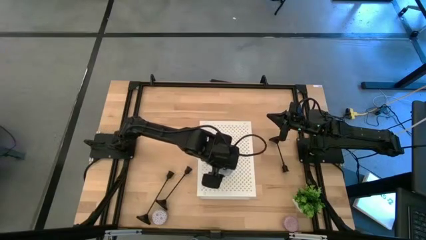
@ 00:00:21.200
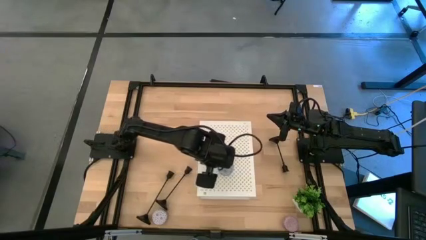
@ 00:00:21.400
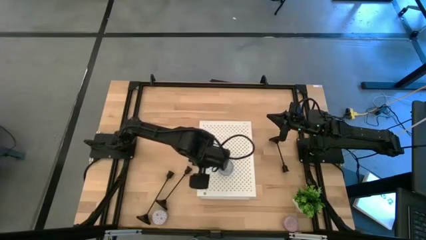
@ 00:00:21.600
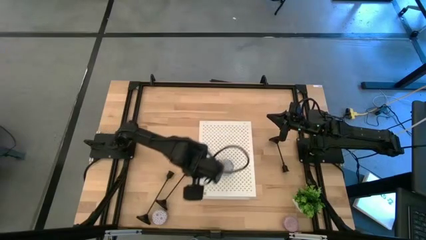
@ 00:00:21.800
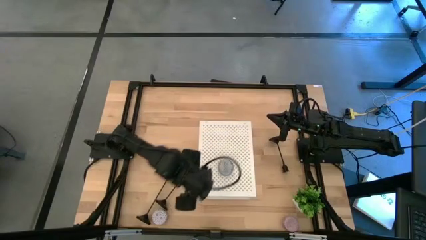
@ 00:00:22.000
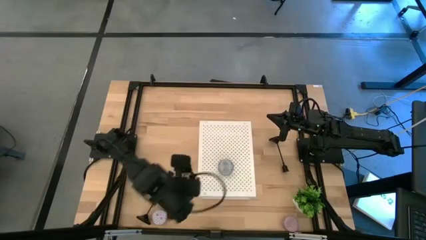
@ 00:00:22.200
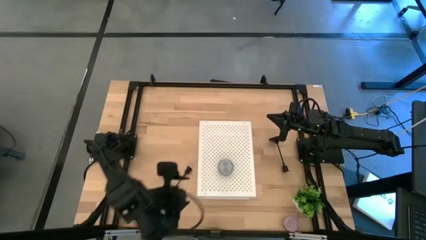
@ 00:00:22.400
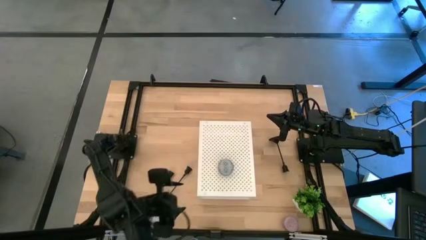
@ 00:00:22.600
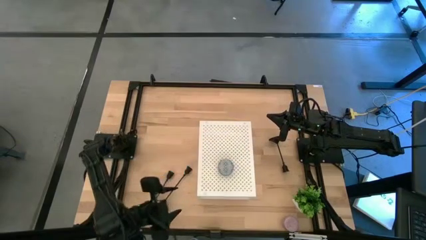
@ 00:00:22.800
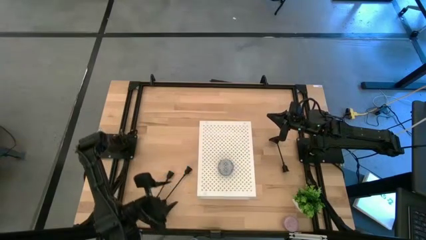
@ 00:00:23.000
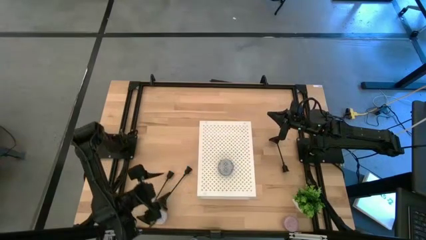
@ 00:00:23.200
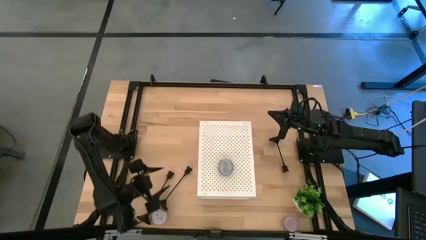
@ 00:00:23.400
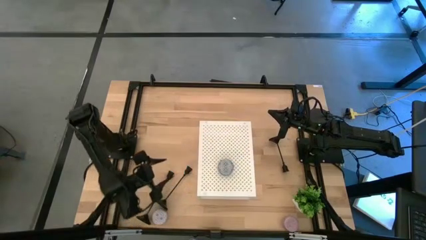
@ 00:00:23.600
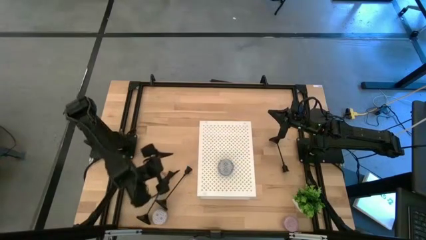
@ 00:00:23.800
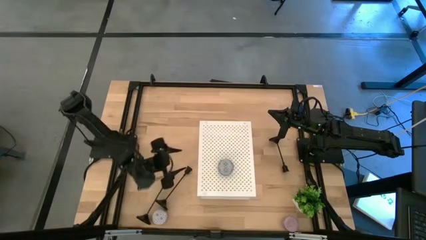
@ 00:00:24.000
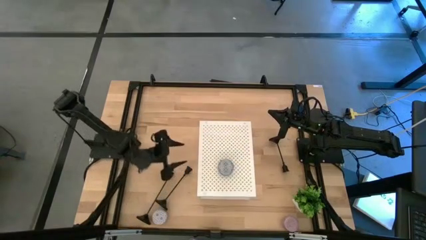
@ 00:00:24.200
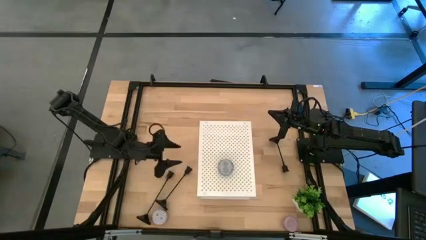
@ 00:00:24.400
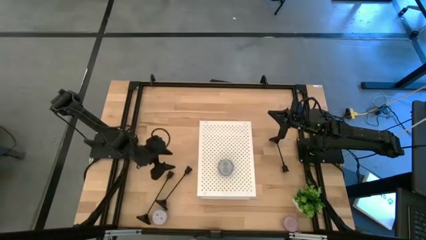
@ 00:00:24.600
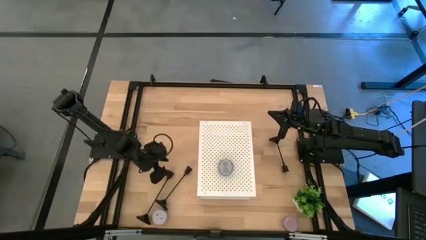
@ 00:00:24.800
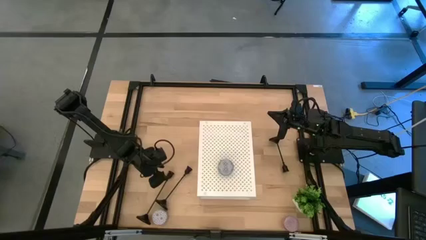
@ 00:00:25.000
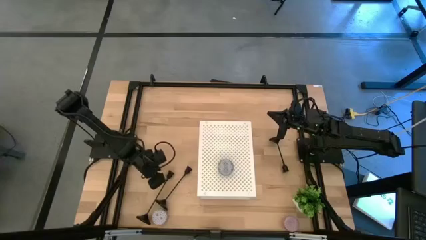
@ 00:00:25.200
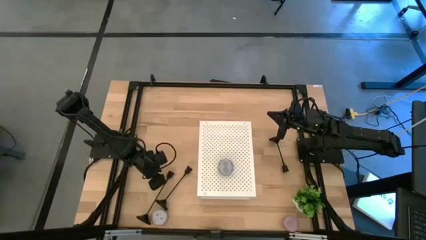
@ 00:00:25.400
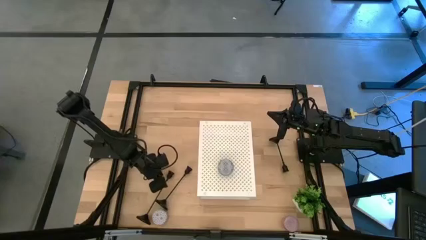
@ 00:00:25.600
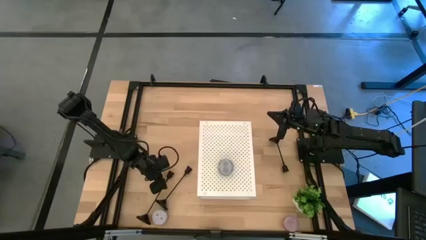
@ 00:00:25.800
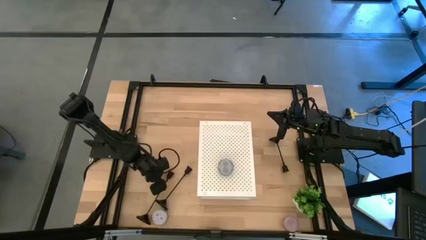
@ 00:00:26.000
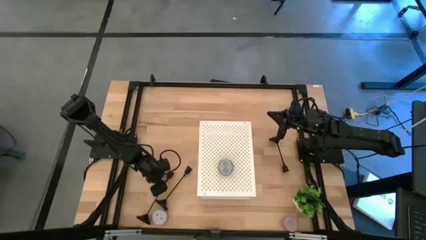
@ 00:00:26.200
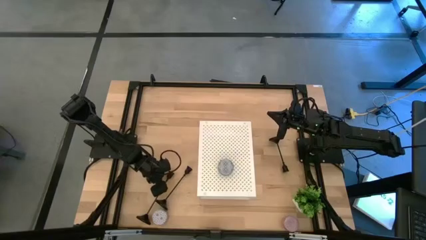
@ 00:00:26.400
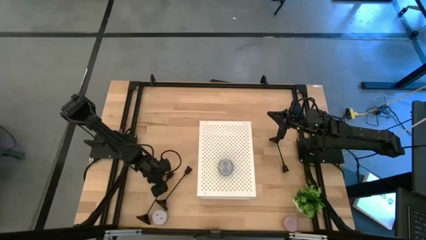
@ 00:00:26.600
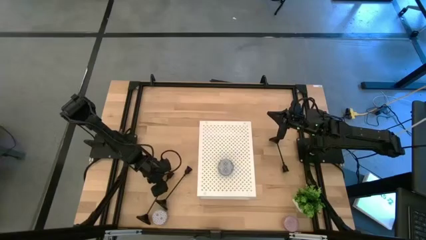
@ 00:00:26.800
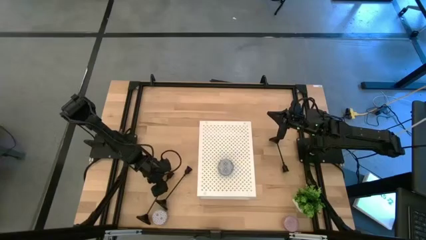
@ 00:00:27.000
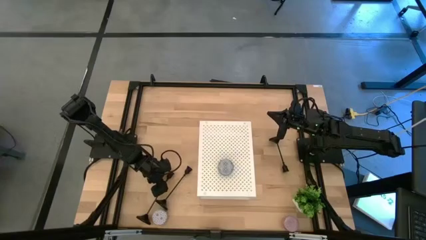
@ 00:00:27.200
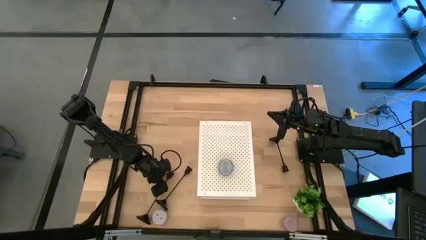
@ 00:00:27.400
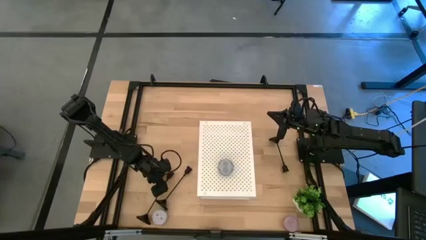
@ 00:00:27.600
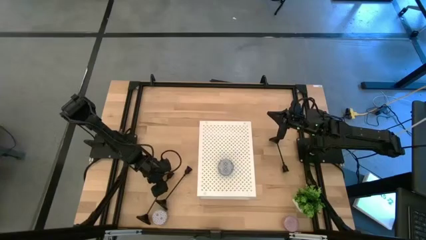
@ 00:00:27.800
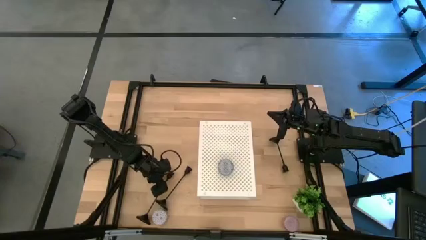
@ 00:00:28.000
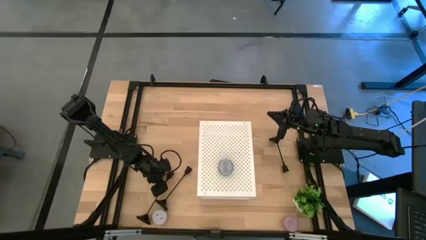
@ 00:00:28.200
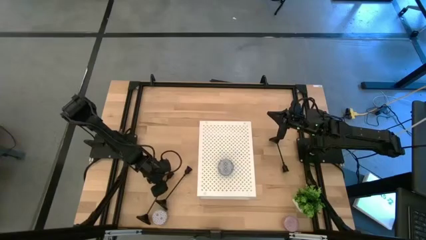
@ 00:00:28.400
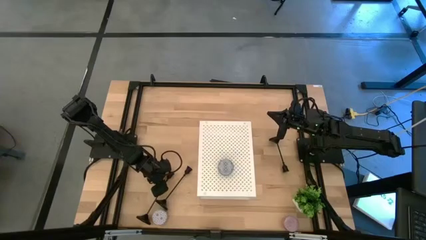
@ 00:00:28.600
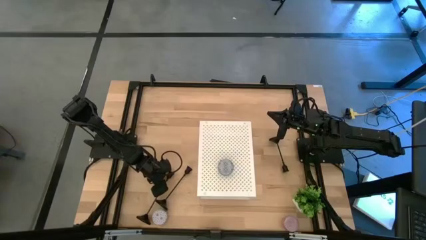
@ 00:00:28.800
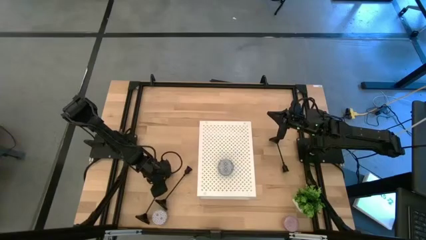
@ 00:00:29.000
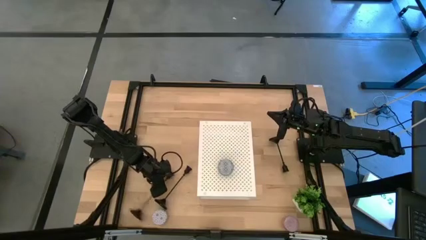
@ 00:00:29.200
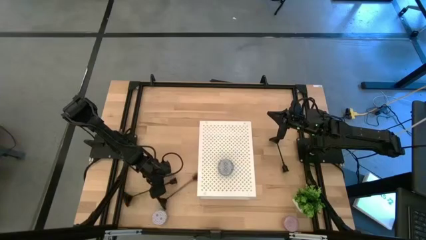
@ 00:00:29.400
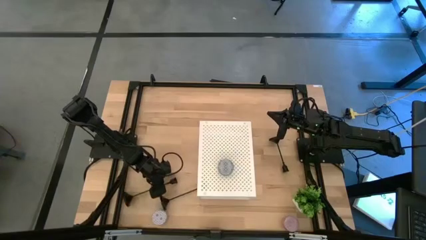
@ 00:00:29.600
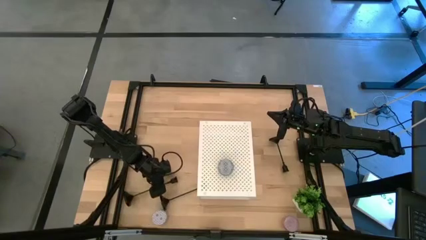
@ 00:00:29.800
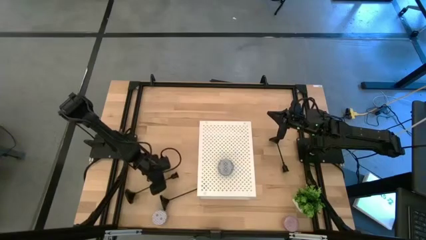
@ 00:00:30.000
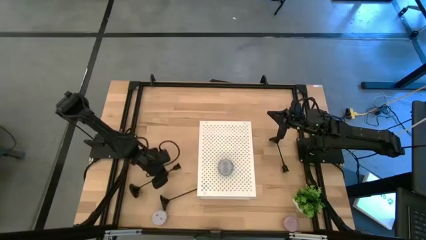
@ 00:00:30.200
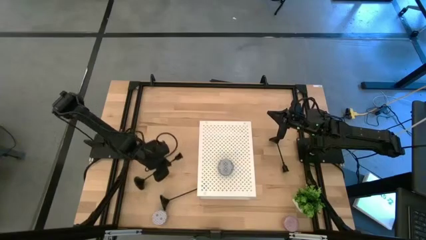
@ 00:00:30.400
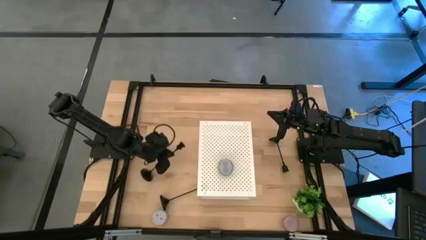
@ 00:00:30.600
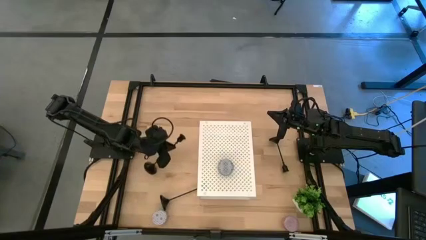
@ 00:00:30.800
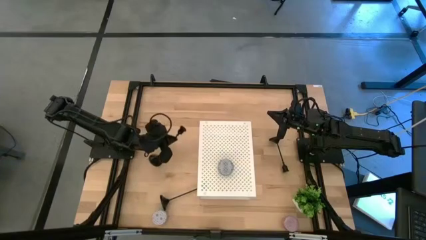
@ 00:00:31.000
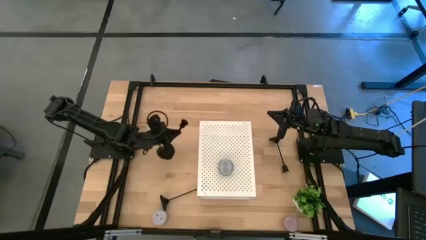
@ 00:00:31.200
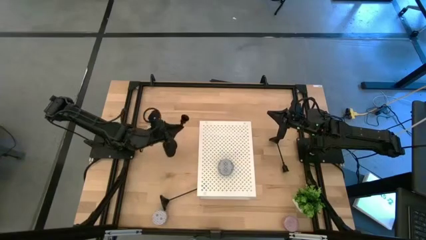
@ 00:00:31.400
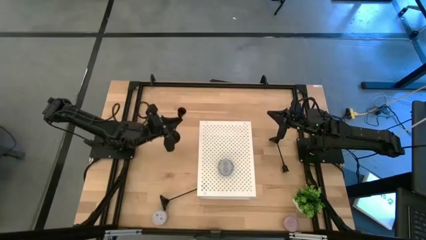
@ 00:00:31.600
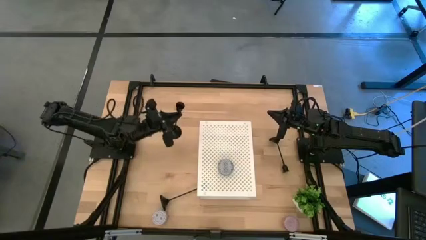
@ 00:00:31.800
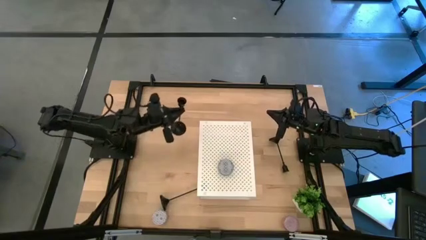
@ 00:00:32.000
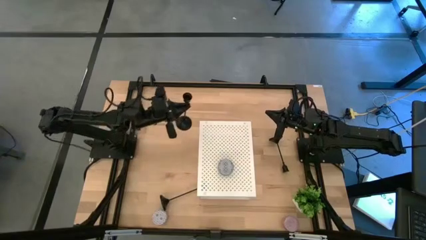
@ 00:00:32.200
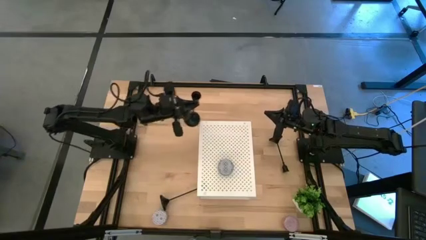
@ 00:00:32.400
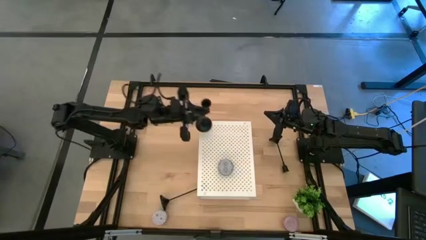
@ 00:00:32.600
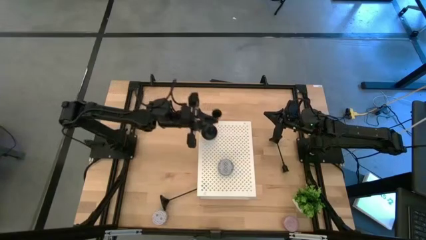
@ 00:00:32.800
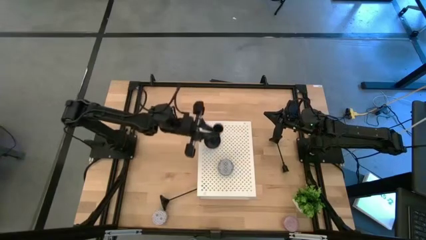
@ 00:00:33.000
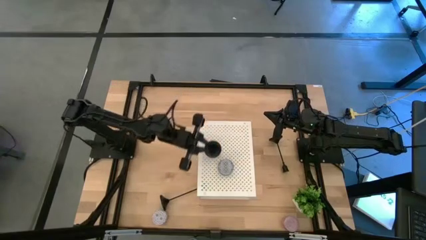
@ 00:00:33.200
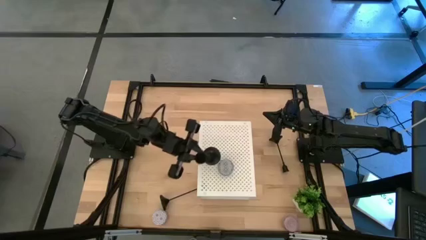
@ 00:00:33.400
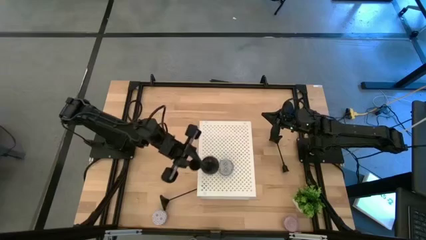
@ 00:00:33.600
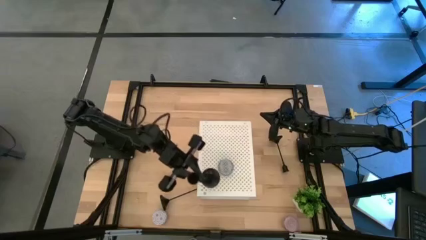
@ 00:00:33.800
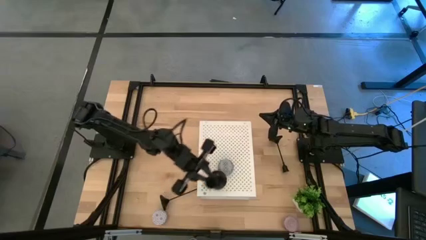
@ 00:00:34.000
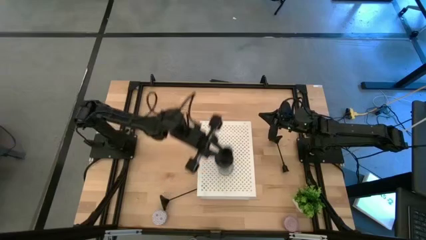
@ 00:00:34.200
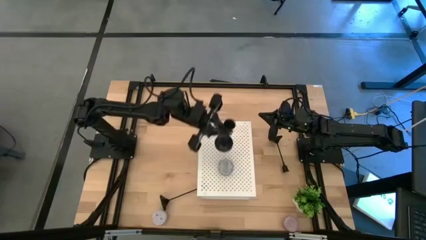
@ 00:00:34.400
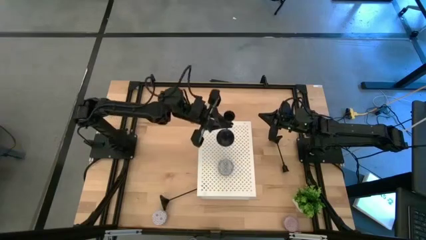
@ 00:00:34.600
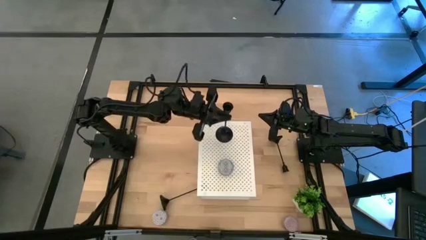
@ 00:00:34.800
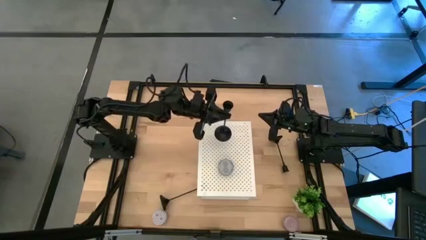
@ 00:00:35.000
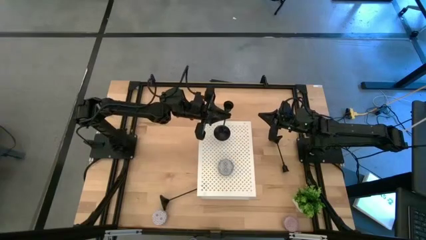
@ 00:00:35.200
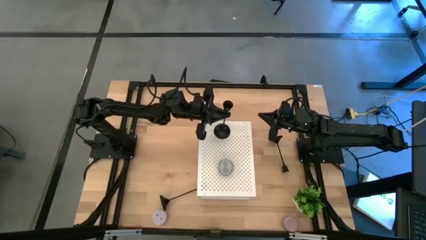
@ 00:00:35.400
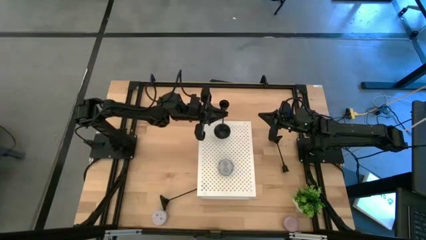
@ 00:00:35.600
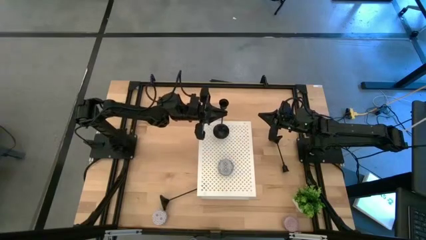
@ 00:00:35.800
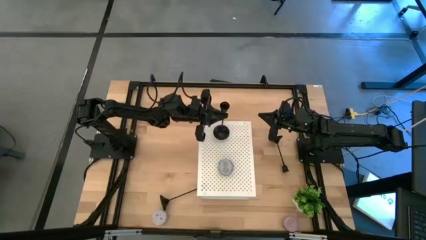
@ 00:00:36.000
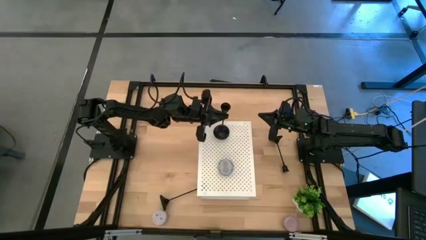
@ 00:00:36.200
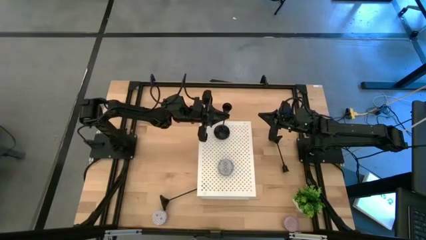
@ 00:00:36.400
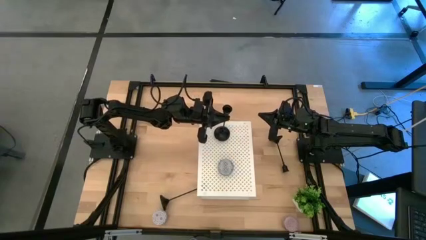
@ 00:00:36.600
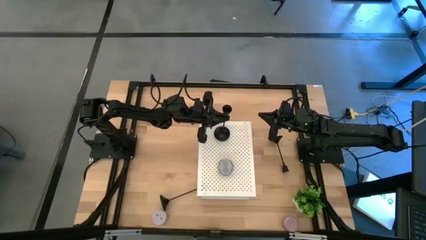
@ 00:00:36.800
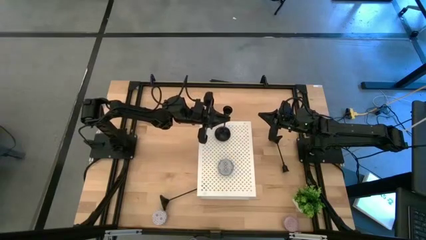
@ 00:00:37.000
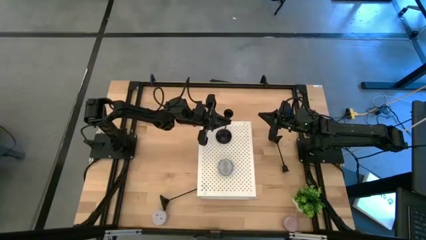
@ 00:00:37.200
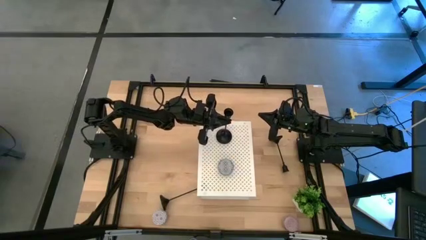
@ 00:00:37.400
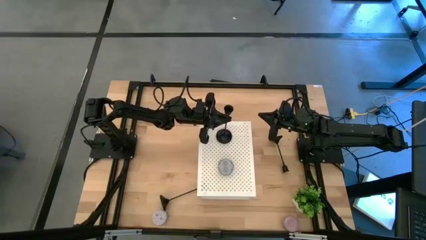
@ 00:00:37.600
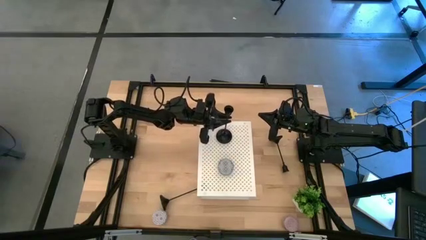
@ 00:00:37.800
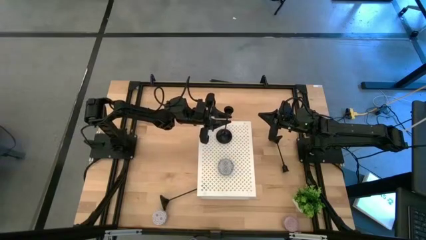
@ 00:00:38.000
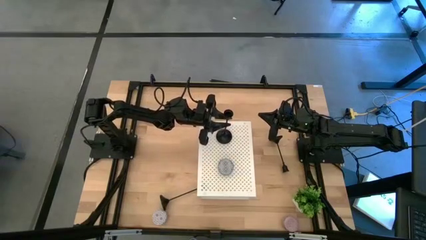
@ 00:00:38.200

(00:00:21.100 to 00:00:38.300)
Task: Pick & Place candle stick holders
Put the left candle holder on the shelf
